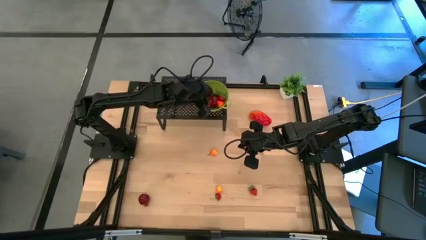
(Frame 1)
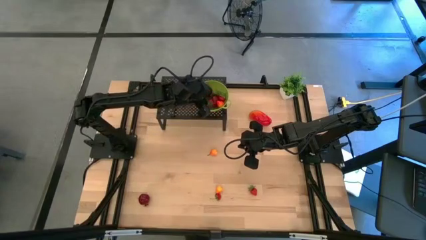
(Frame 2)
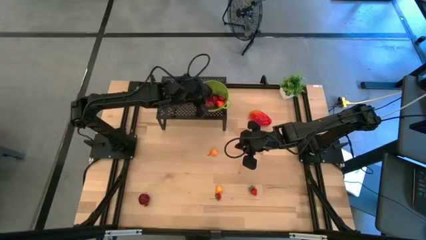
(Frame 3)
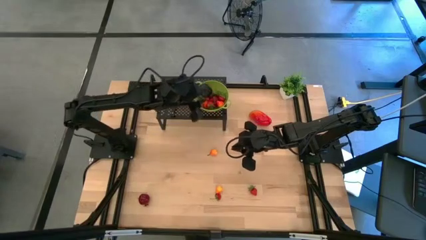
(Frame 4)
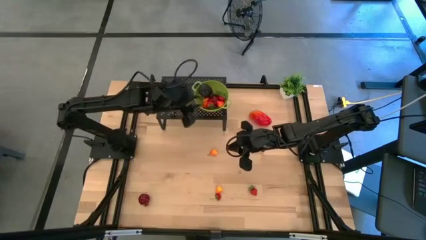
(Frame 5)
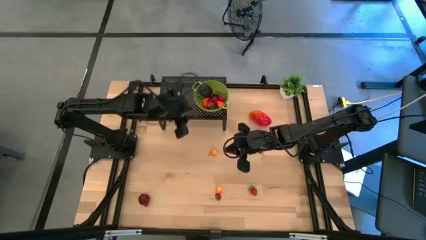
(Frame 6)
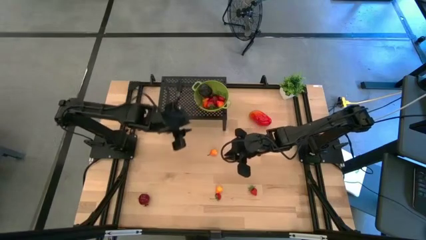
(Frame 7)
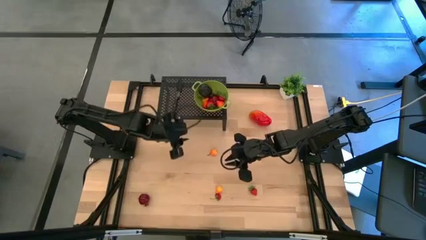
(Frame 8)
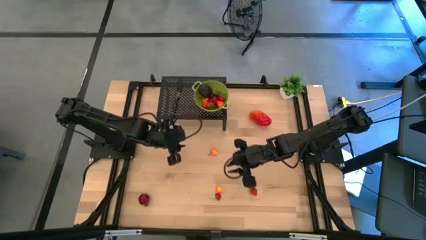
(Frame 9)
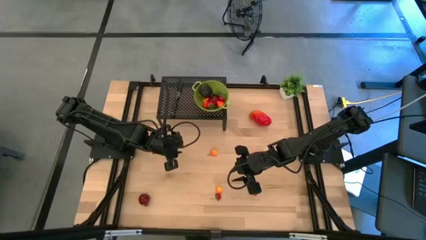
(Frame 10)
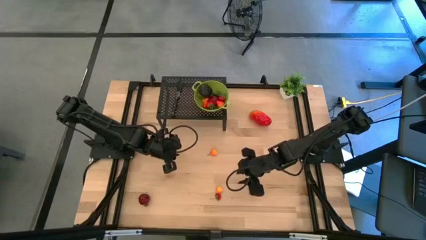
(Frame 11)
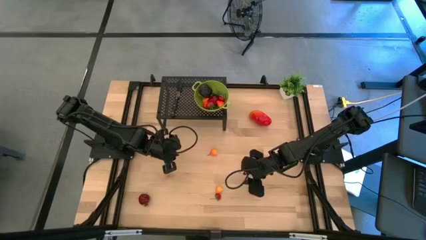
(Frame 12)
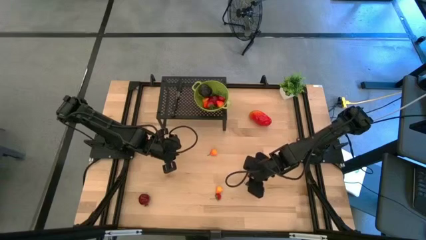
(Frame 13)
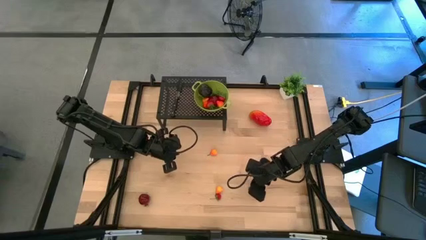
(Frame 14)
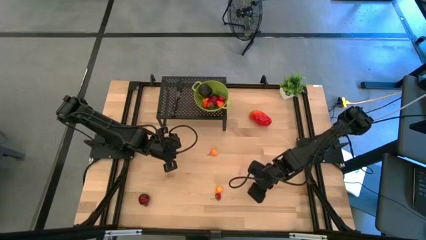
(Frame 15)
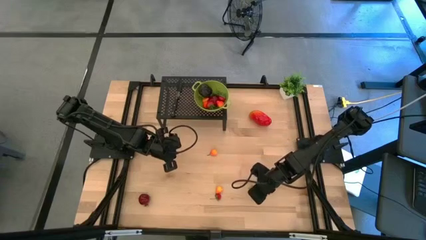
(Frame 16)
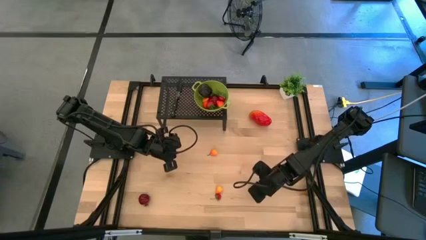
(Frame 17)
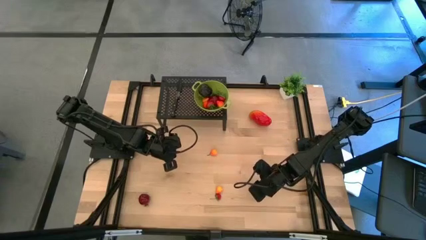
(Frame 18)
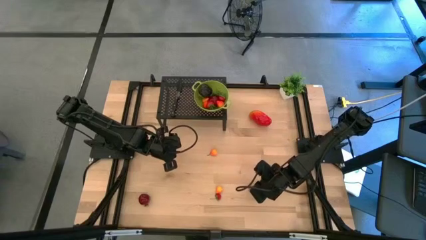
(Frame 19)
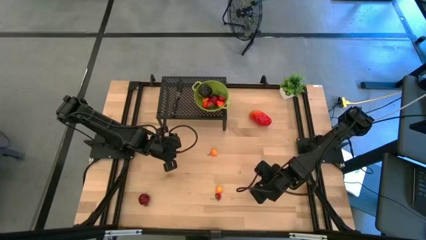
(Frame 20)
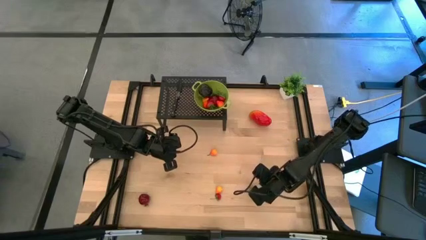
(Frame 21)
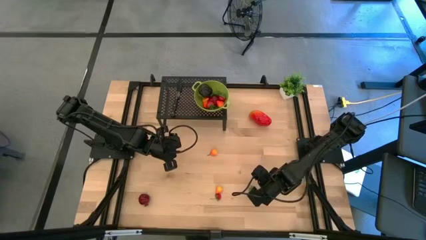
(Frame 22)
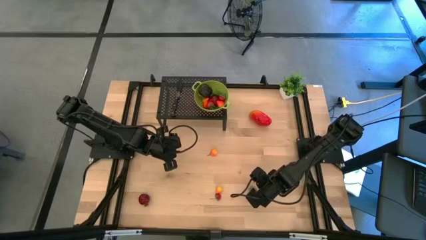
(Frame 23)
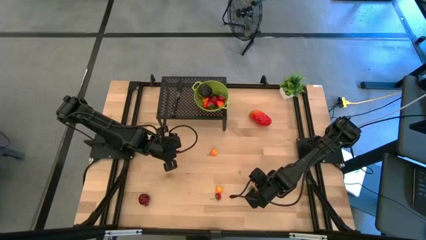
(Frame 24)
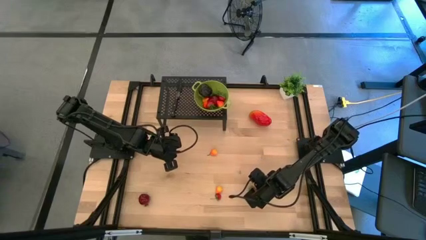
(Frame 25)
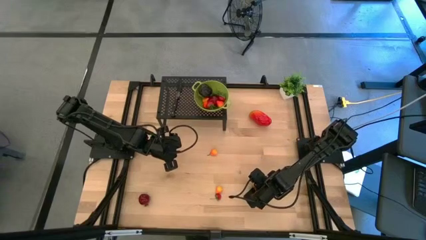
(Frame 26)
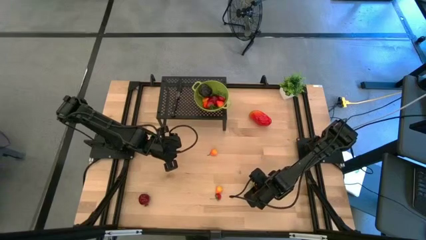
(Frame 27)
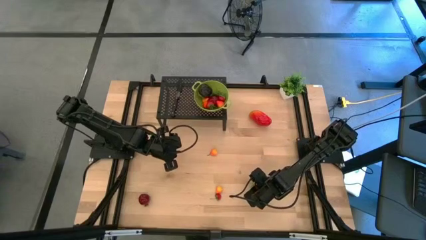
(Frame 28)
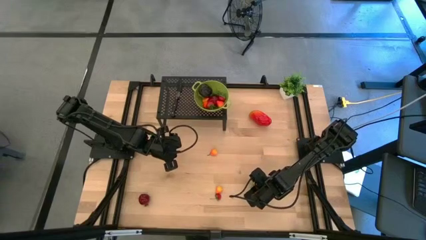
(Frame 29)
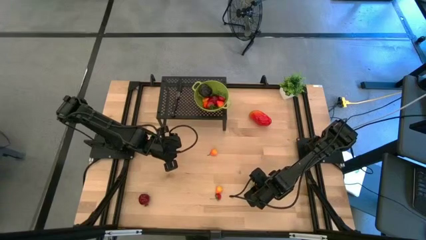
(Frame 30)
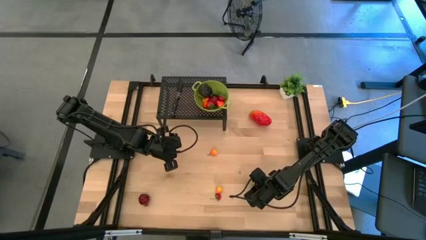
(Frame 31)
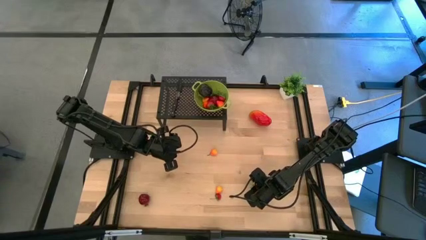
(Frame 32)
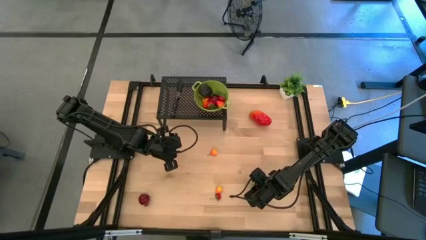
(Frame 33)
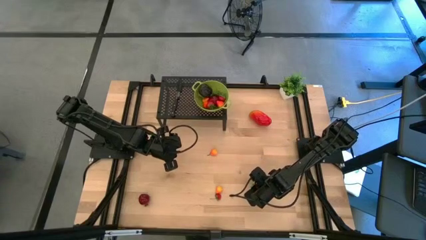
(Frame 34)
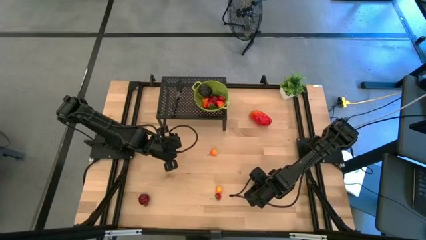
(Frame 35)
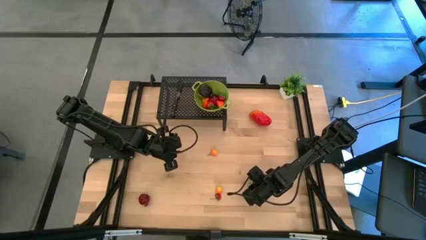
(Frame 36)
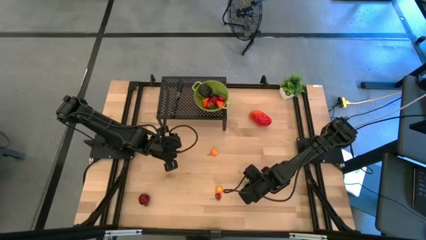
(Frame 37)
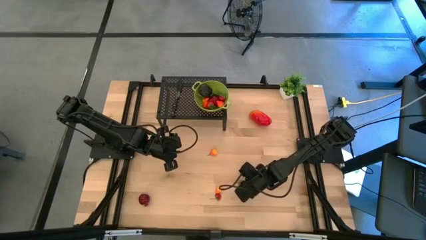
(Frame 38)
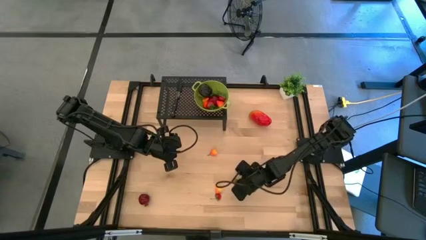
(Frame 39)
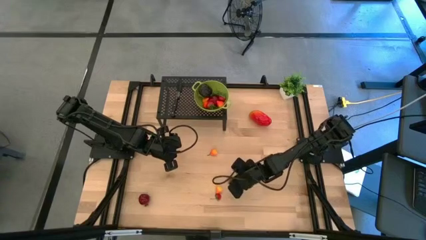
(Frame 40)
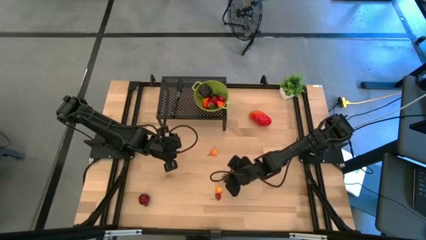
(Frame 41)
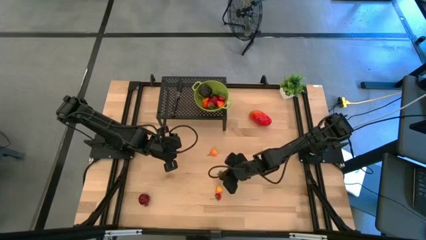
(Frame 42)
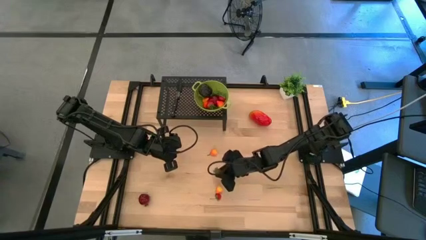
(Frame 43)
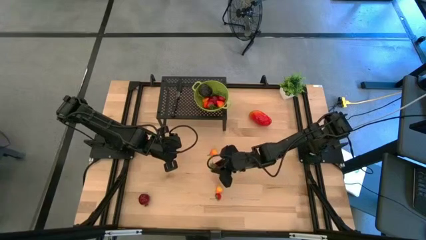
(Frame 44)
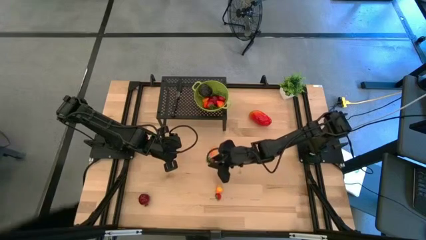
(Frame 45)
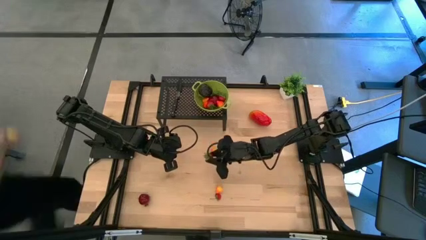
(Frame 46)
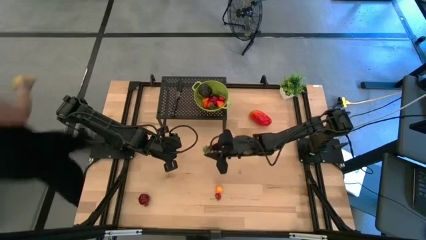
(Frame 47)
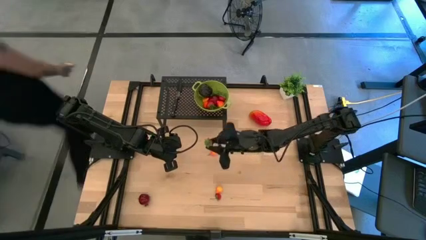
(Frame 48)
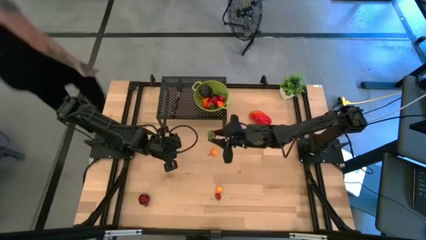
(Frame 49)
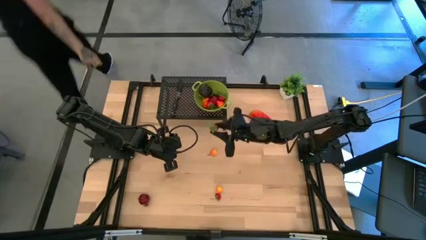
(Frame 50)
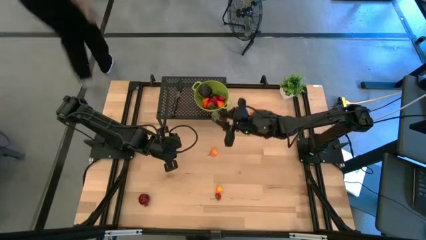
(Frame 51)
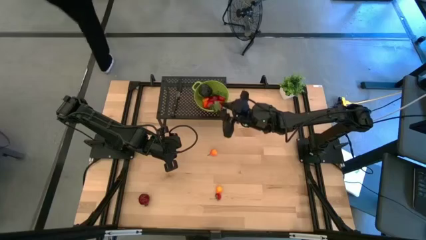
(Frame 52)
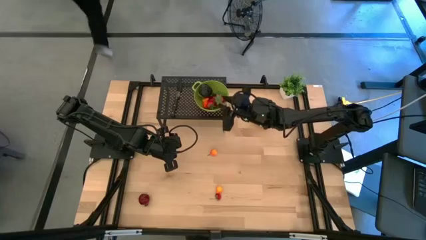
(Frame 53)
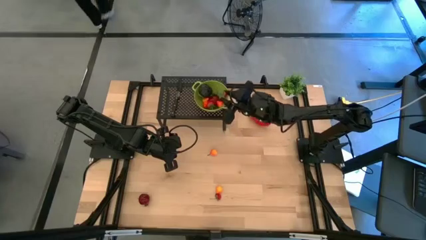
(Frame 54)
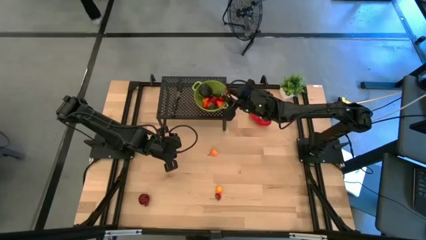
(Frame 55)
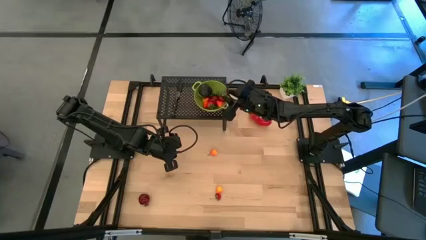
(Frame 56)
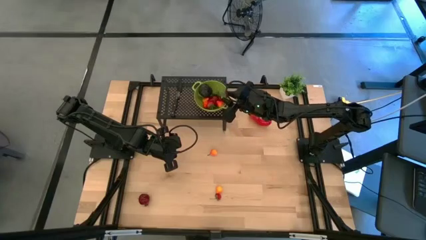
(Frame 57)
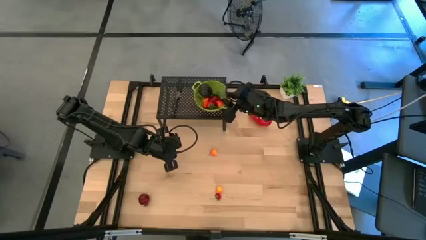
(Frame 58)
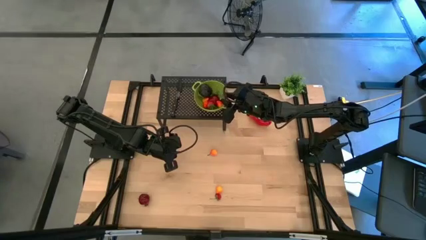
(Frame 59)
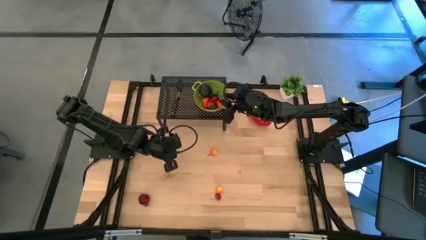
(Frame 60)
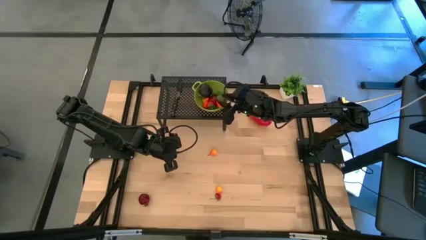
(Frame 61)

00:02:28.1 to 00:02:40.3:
Task: Pick & Place Fruit
Put the strawberry into the green strainer bowl on the shelf

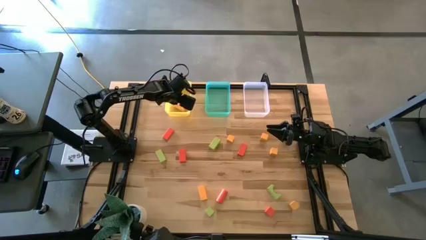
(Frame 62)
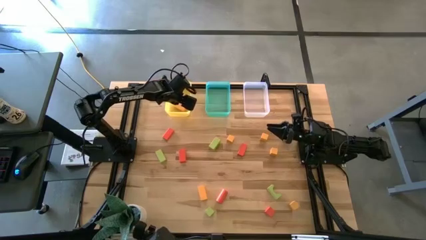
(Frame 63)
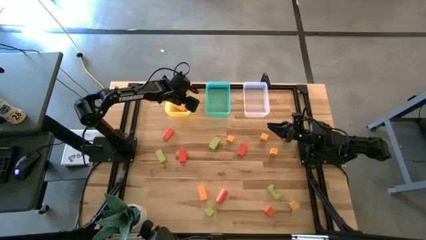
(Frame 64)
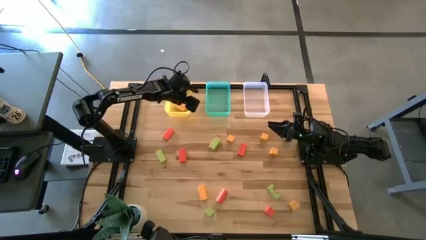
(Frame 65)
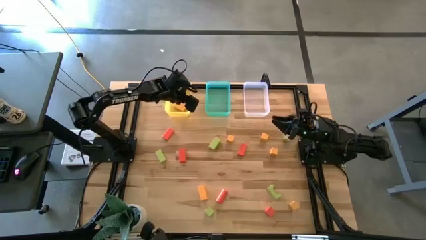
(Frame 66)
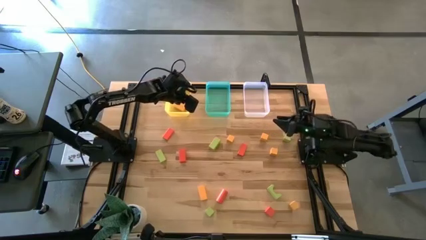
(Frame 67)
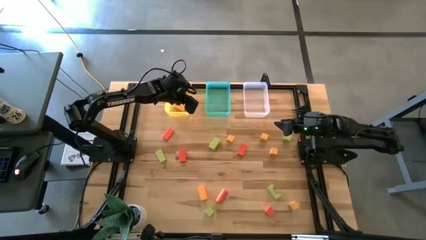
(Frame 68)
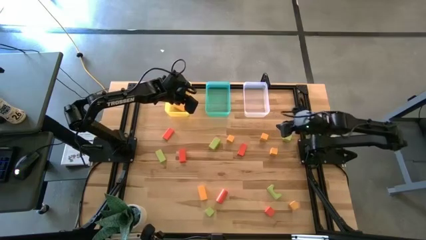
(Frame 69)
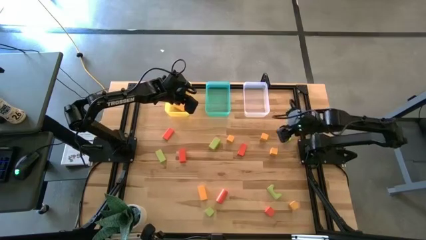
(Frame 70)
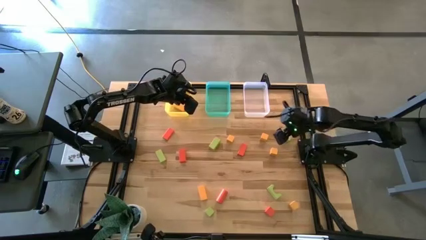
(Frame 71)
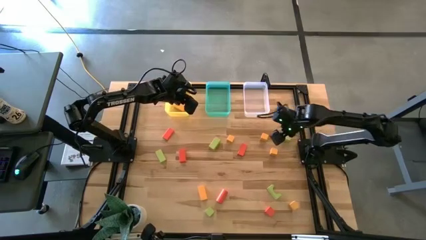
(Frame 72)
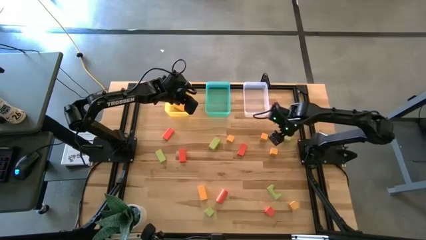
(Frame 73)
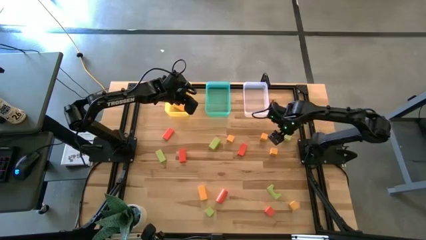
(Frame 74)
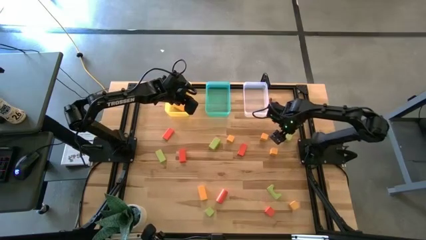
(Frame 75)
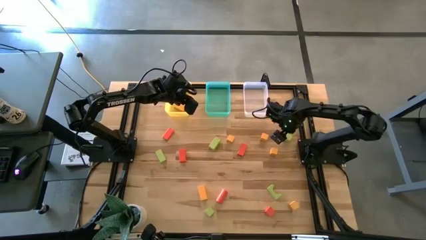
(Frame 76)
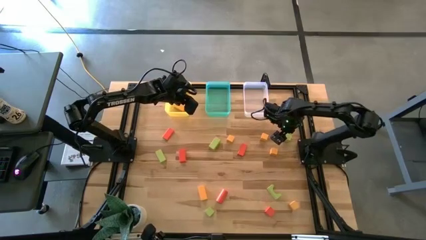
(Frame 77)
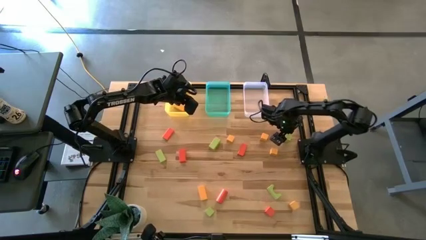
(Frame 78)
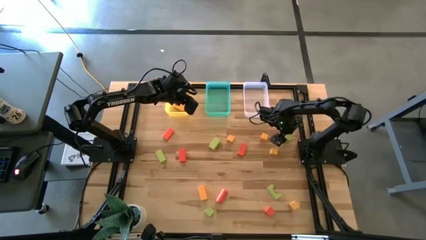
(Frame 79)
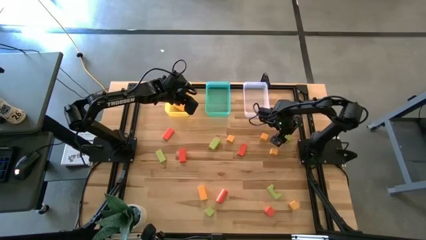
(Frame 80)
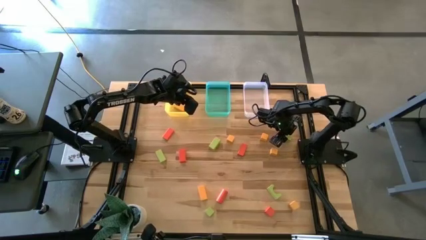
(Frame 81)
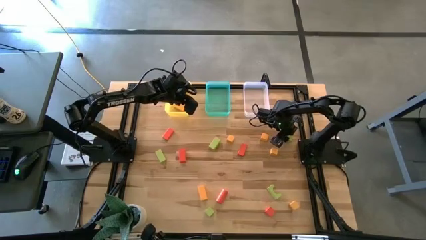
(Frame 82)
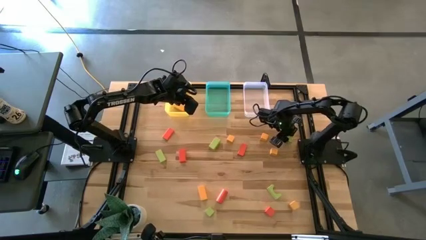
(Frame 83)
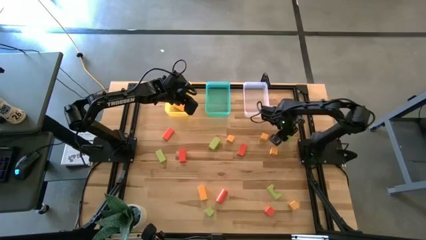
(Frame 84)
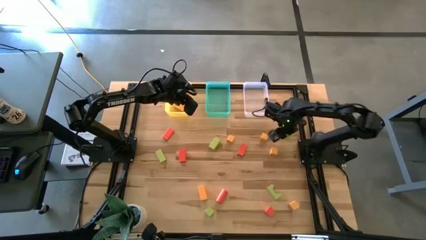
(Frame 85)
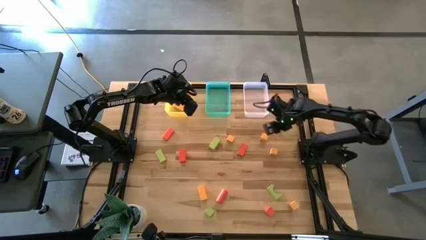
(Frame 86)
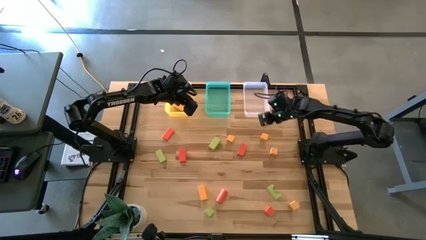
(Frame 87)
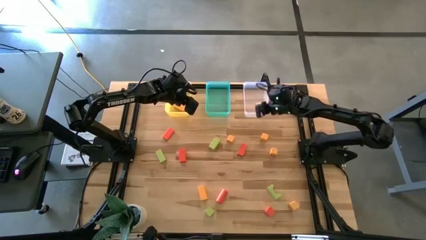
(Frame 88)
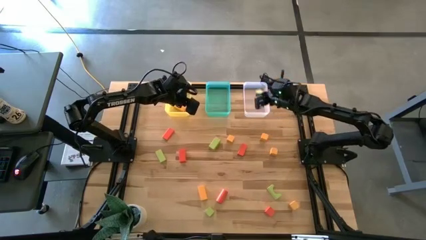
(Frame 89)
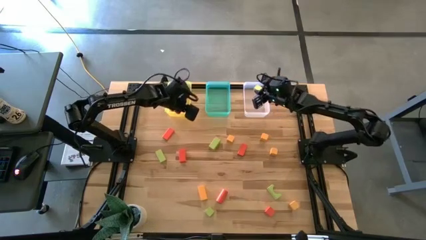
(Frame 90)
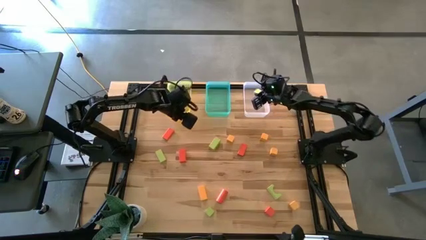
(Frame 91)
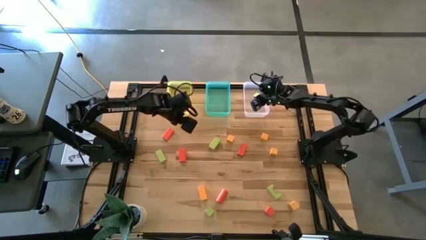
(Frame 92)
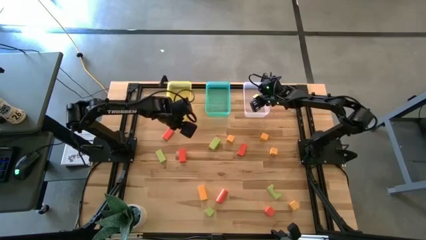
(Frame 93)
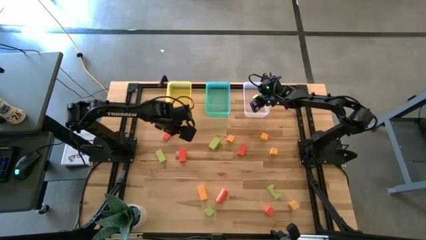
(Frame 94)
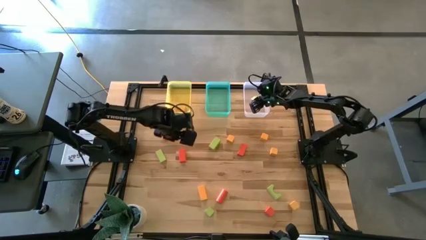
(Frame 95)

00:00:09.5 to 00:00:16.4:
Task: Sort & place blocks by color
Put the light green block into the white bin
